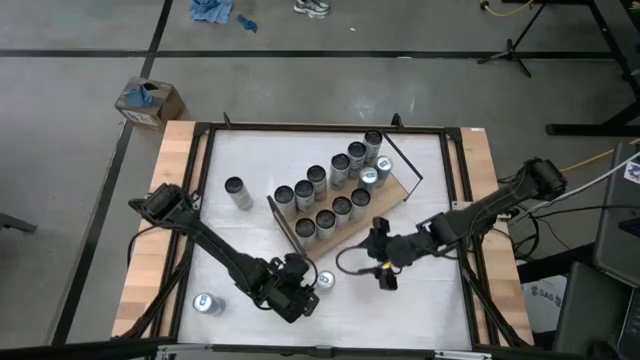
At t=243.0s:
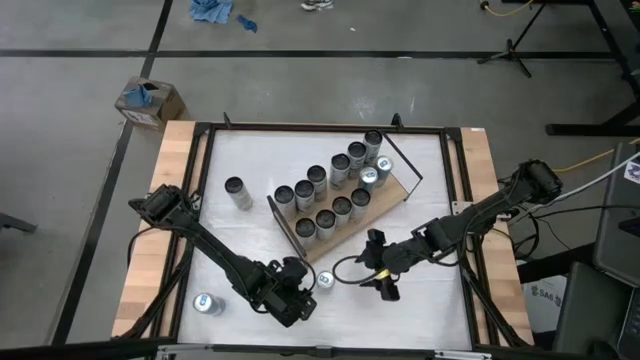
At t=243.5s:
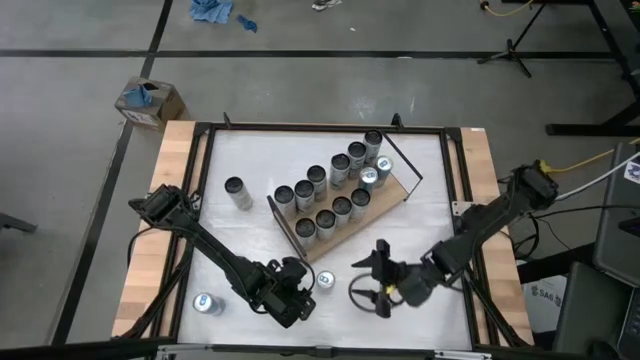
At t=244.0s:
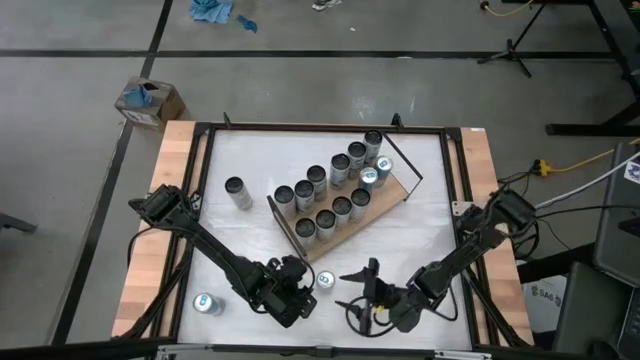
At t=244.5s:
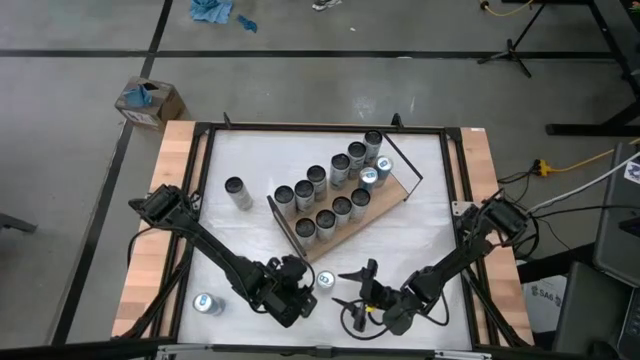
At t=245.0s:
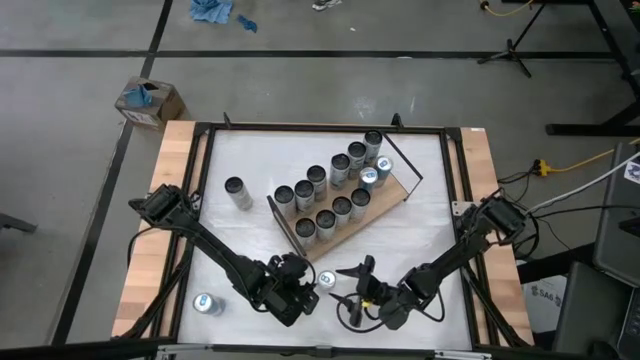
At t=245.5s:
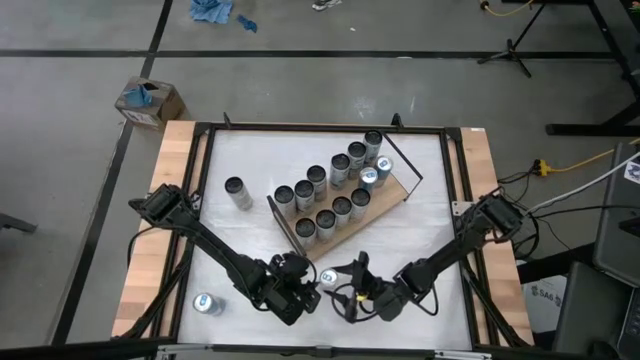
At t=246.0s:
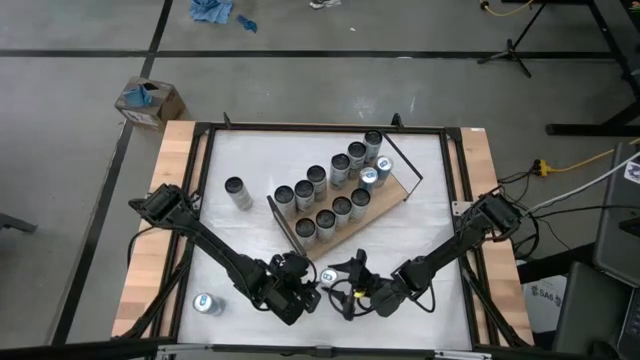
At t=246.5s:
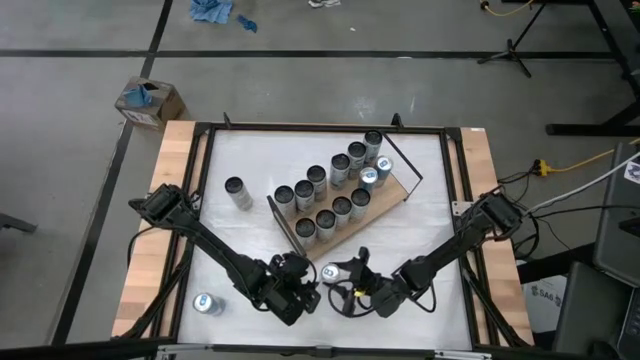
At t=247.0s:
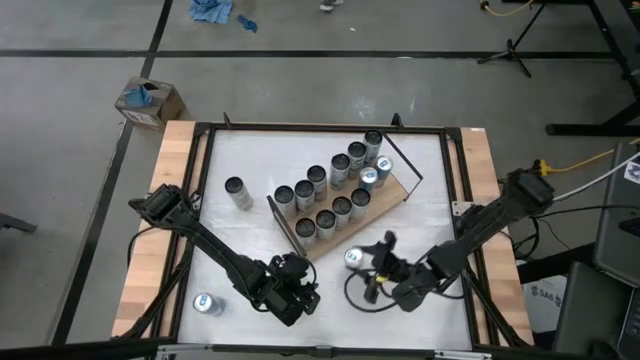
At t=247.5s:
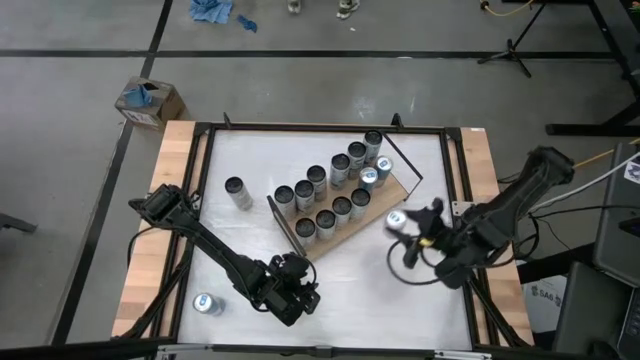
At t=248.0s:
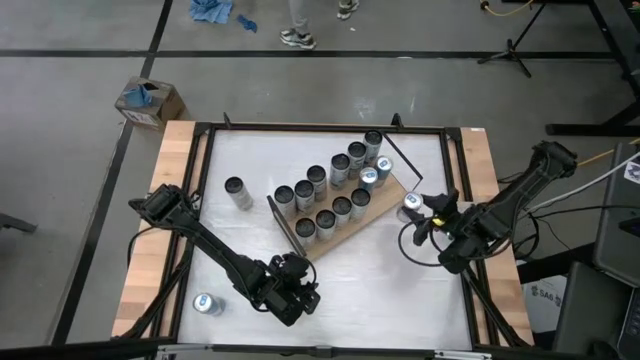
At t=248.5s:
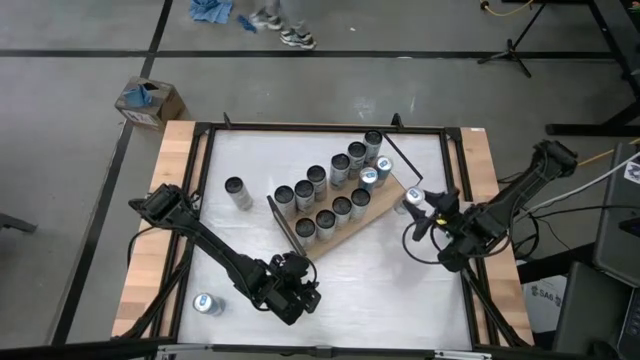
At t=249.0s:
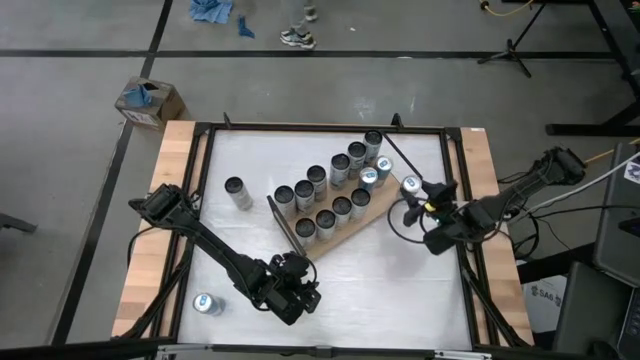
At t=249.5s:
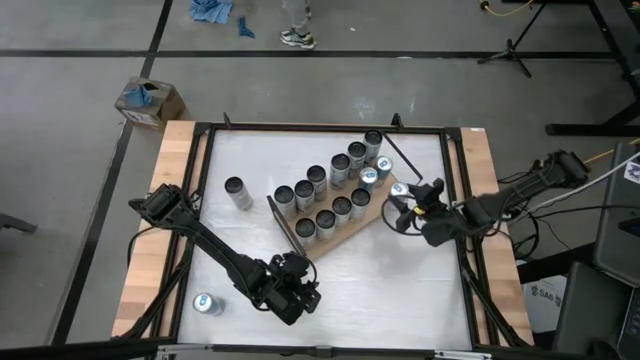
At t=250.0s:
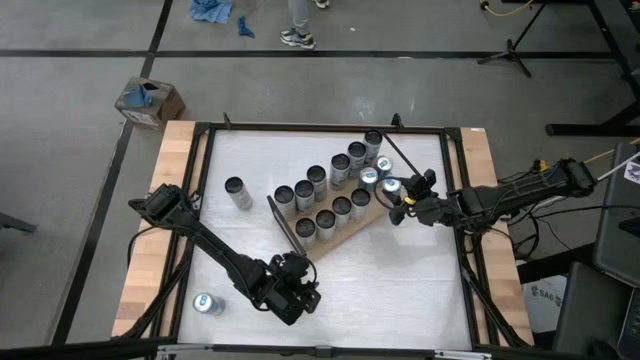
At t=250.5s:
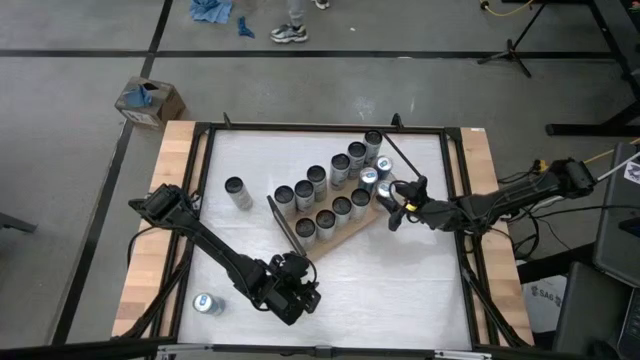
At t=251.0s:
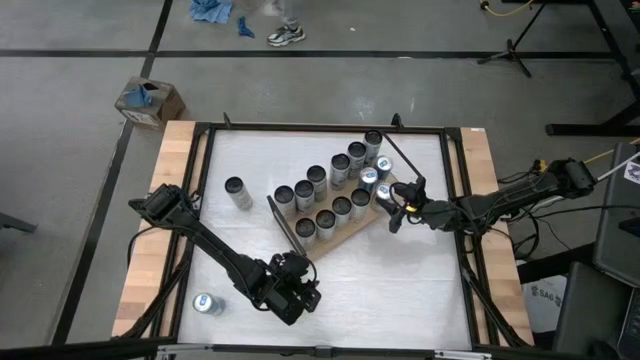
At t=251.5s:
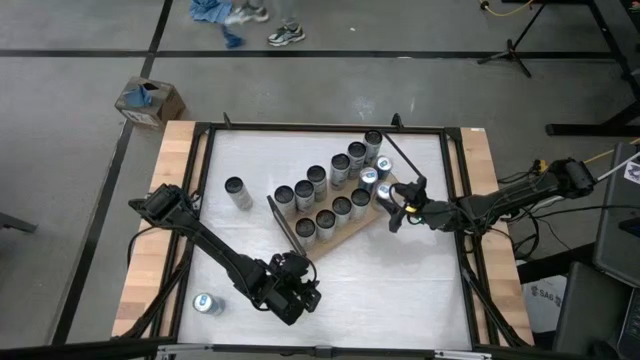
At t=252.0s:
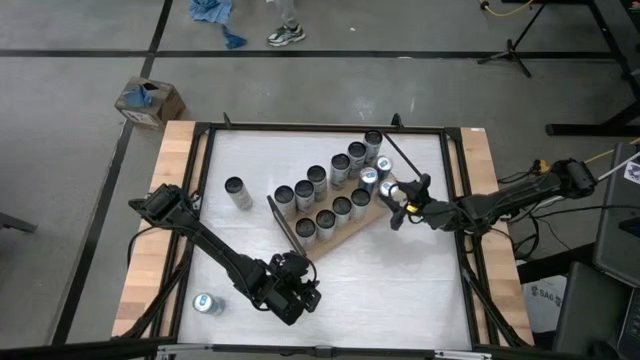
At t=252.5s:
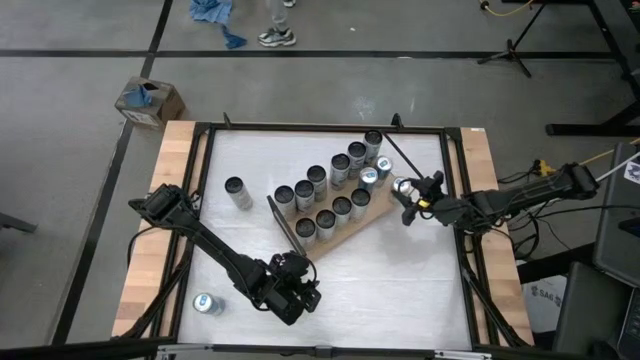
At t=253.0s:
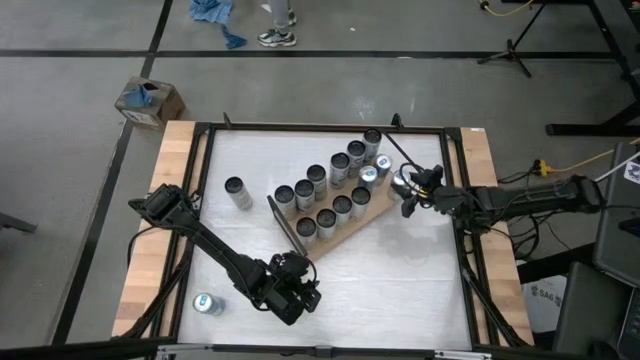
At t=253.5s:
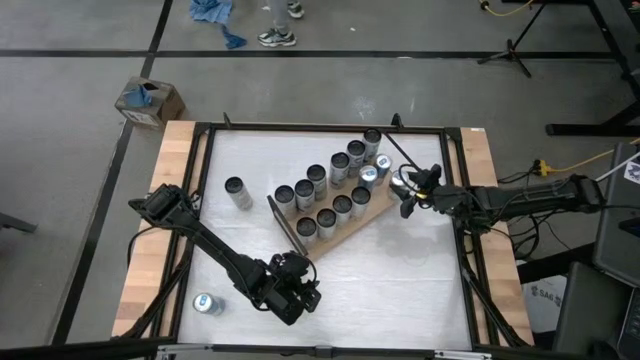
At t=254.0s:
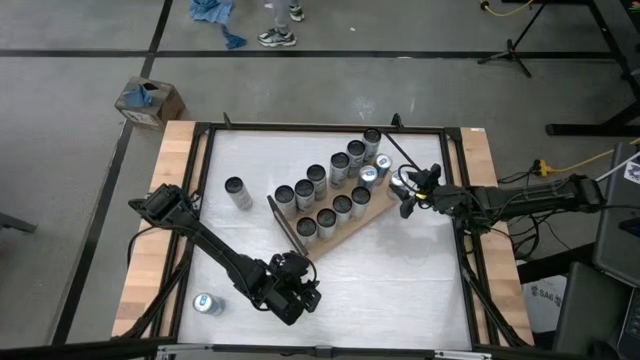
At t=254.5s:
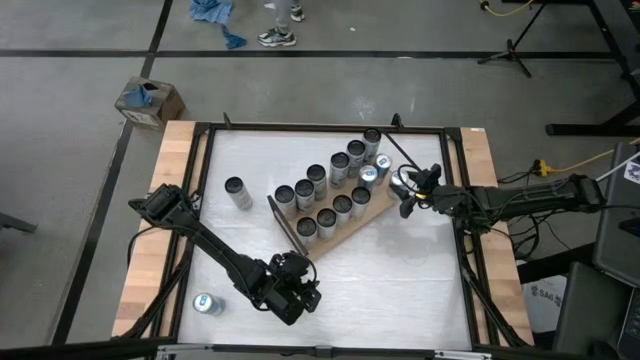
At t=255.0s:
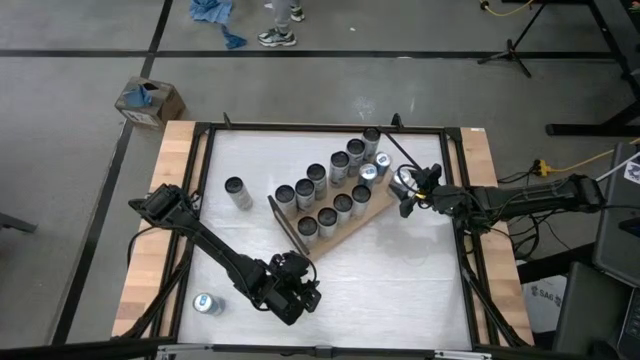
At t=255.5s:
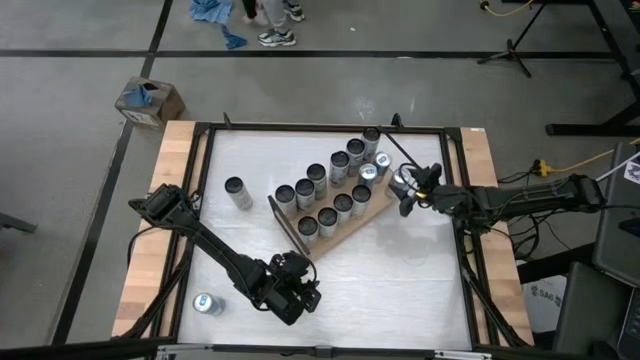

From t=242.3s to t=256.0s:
Task: Place canned beverage on shelf
Put the blue soda can on the shelf

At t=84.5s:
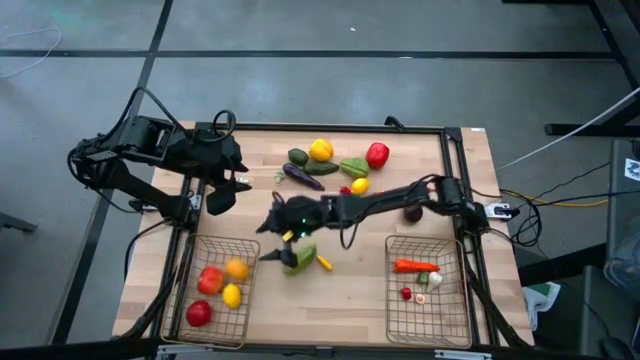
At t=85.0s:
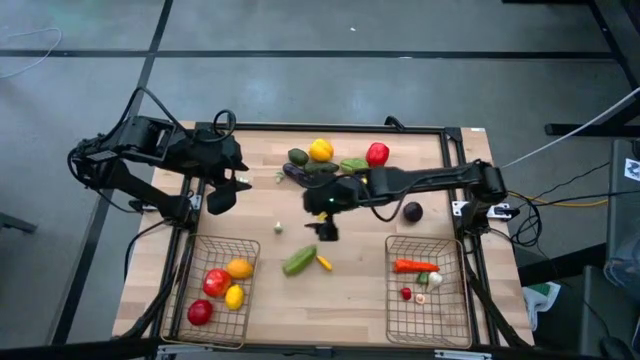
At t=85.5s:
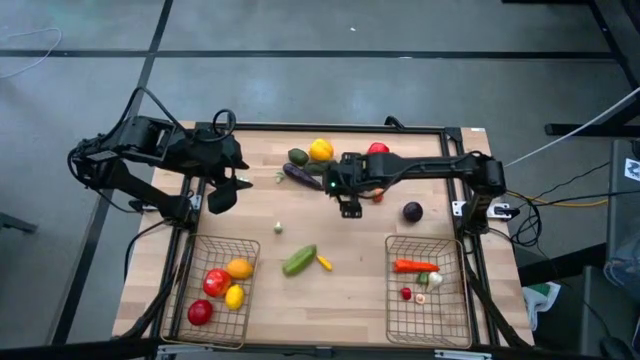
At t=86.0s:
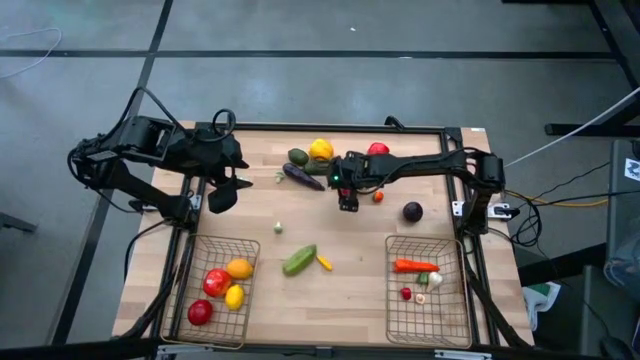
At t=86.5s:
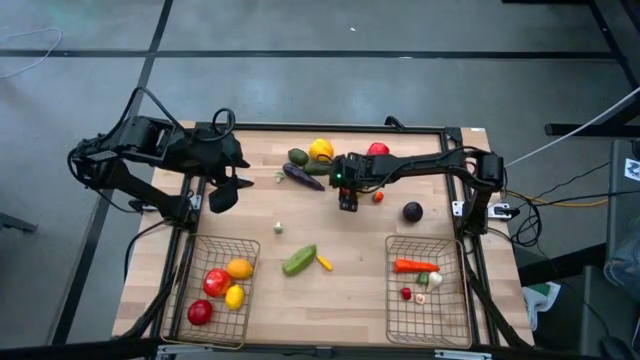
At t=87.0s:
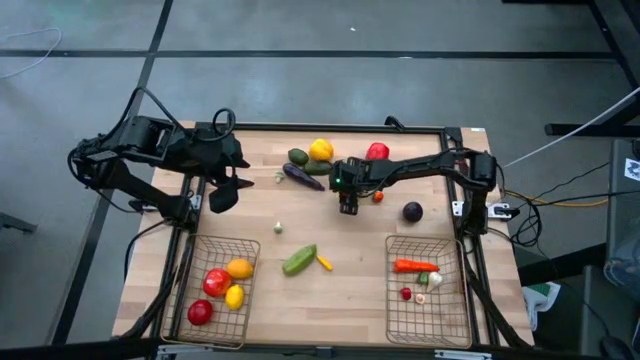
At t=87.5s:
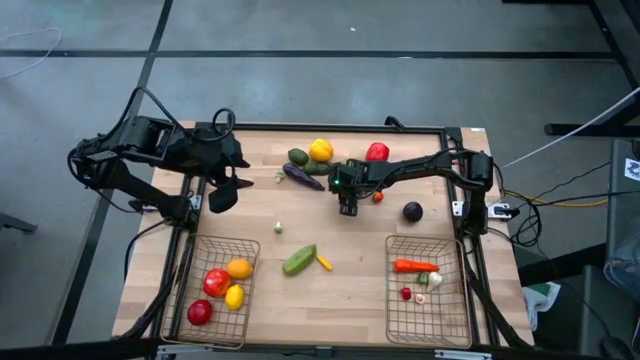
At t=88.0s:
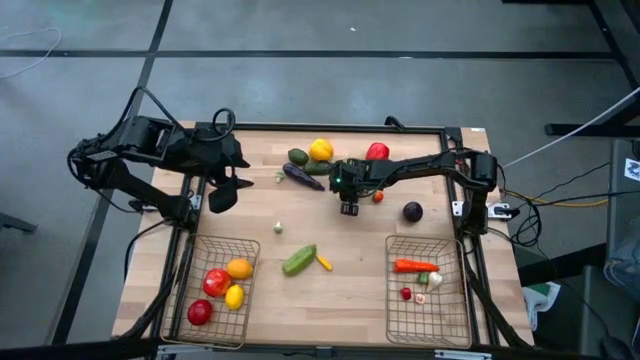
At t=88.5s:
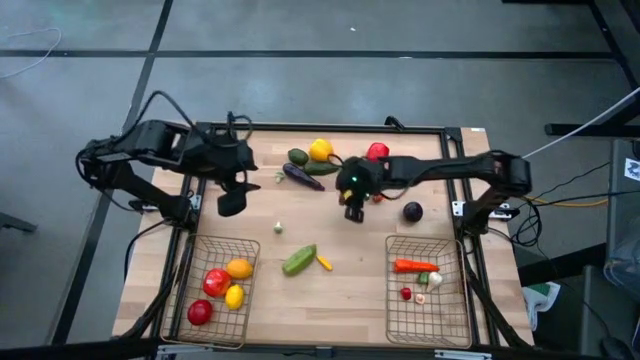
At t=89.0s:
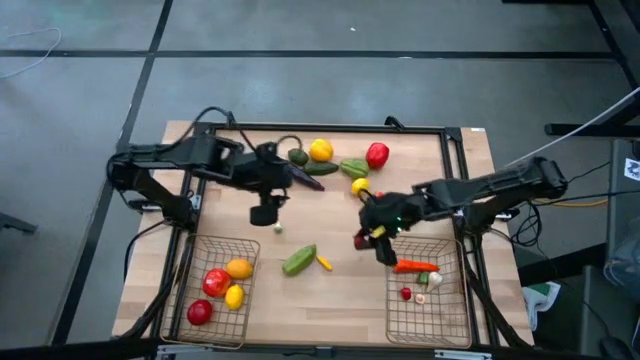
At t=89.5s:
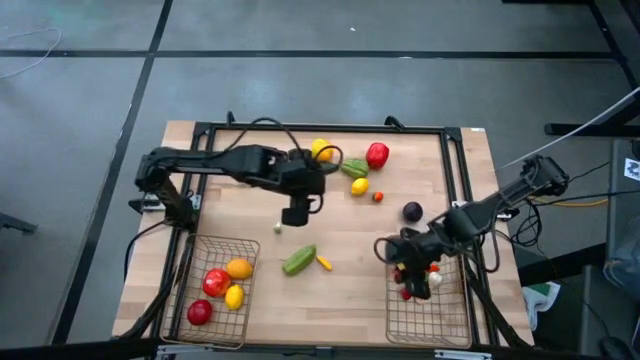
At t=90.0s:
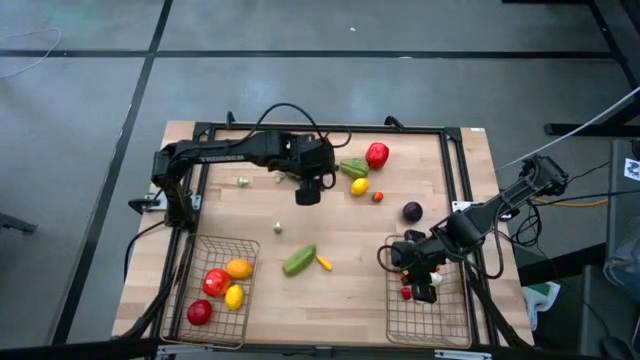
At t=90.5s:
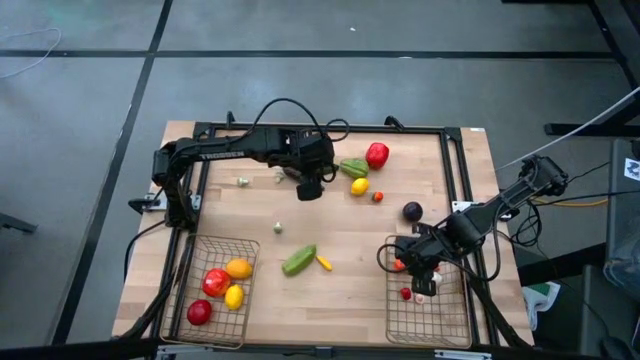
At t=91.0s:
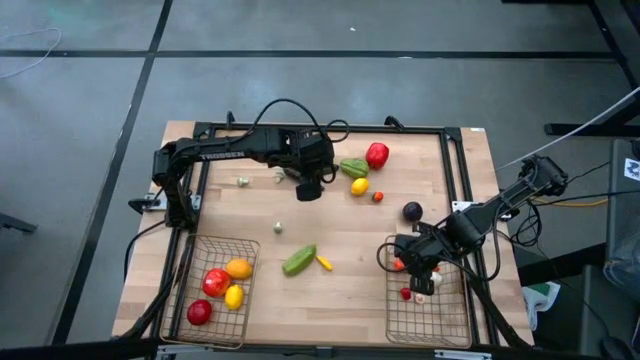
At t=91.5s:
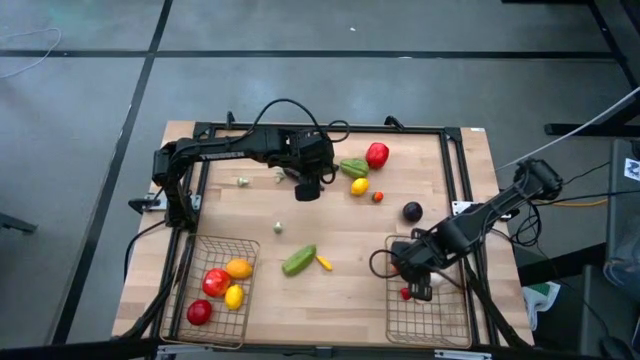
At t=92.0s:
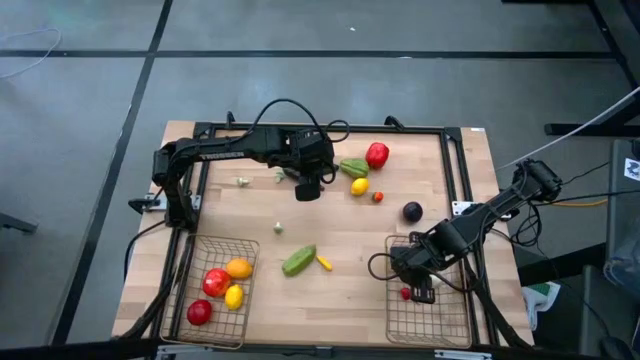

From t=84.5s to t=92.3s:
Task: Sort produce into baskets
Put the small red chilli pepper into the right wire basket
